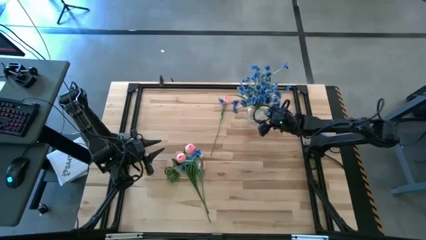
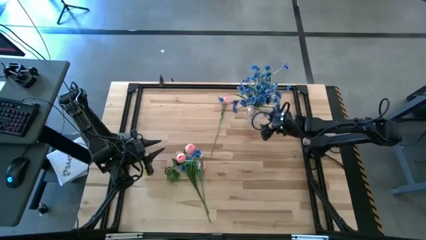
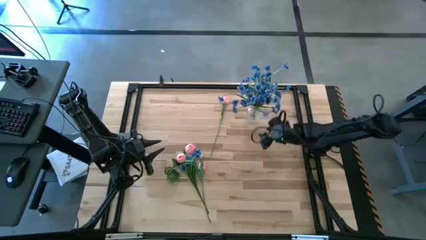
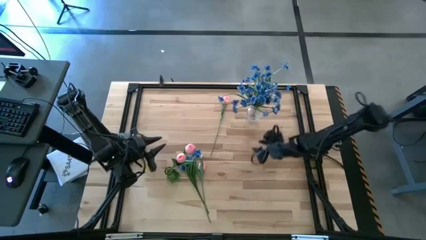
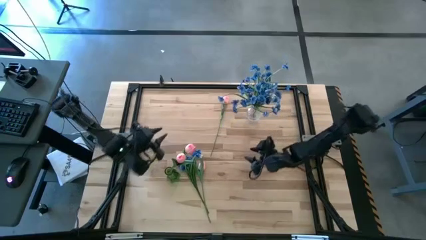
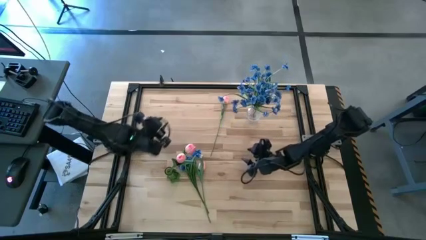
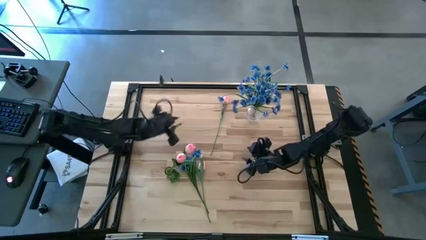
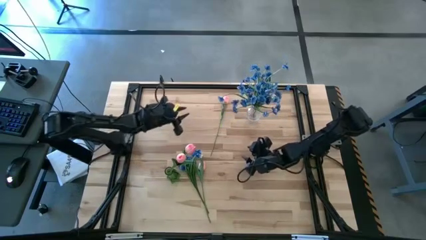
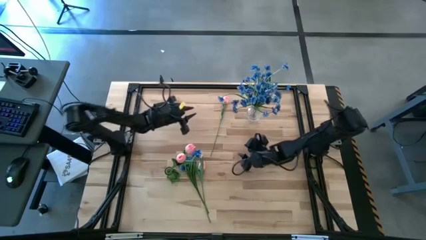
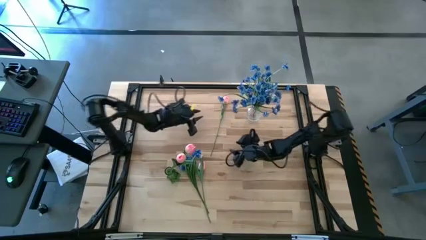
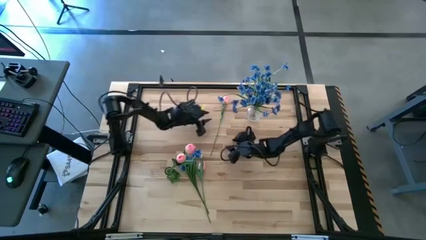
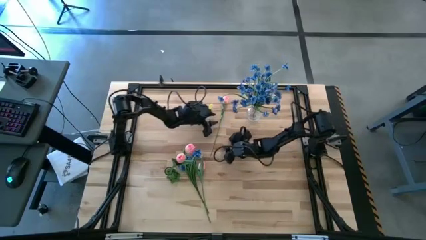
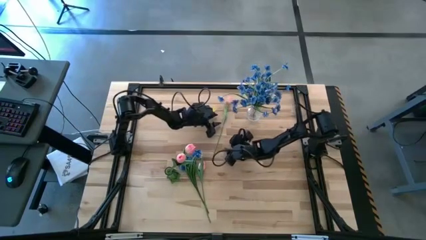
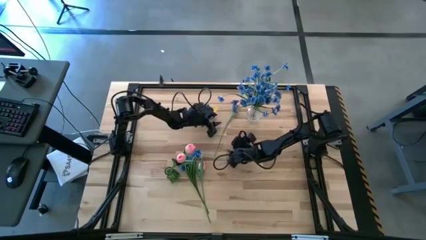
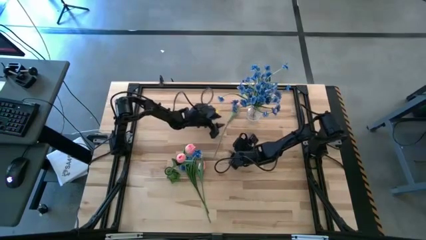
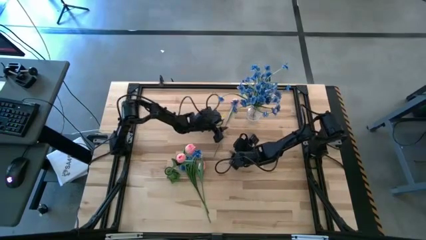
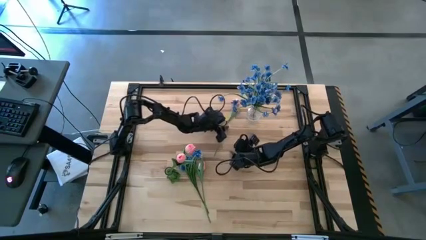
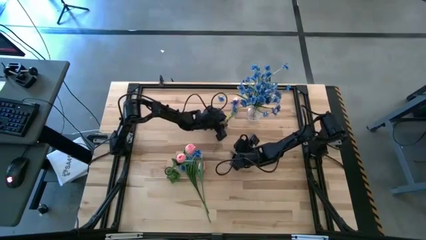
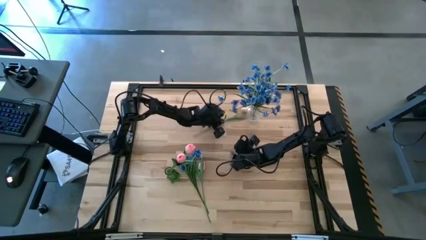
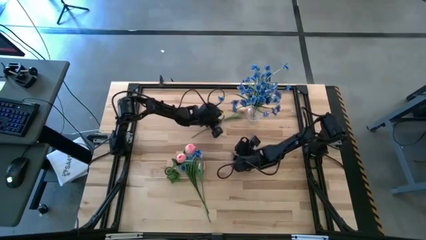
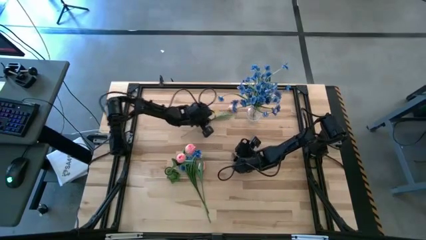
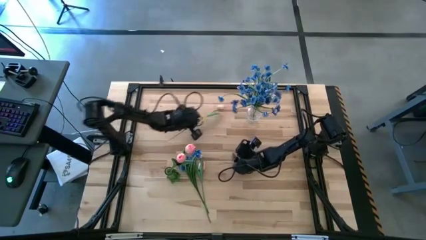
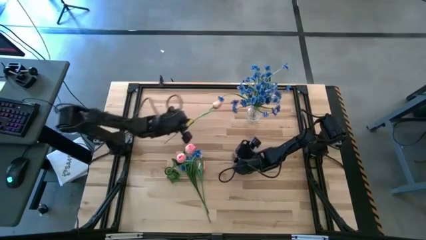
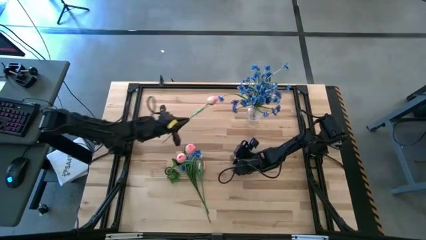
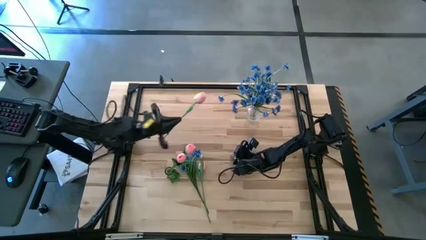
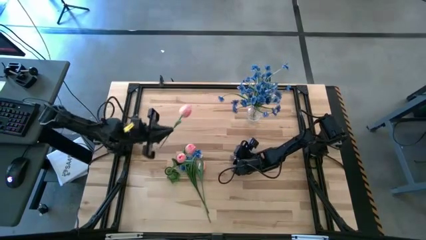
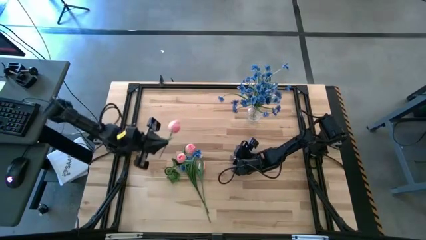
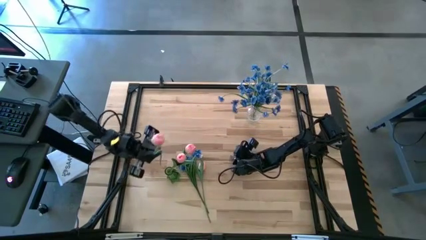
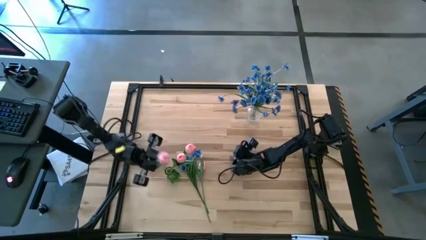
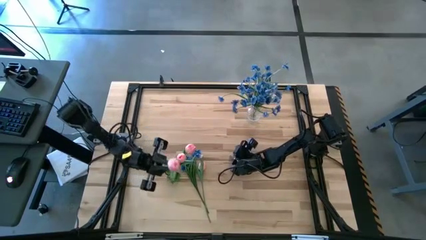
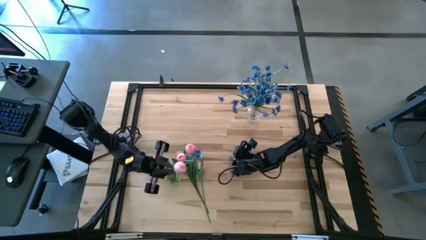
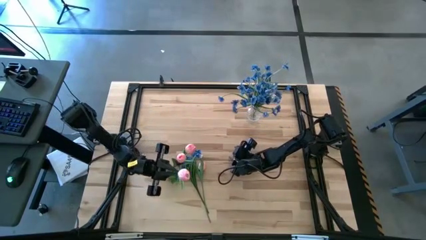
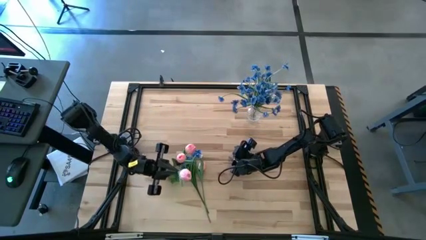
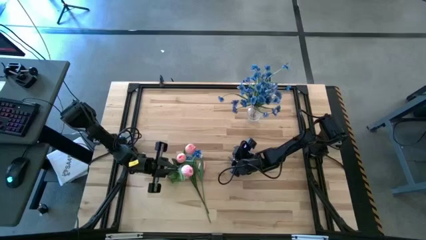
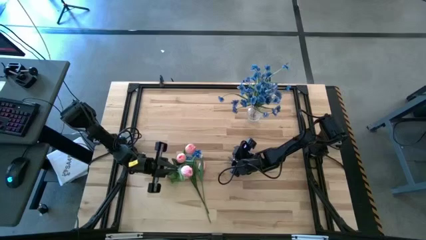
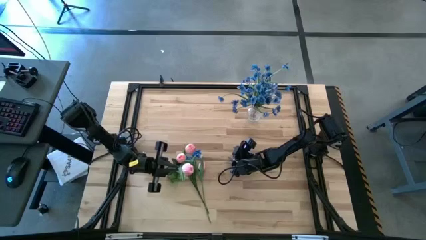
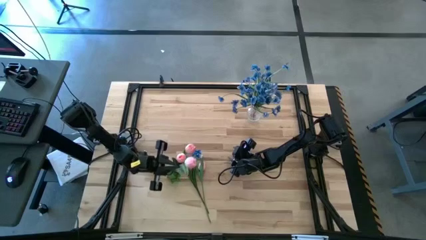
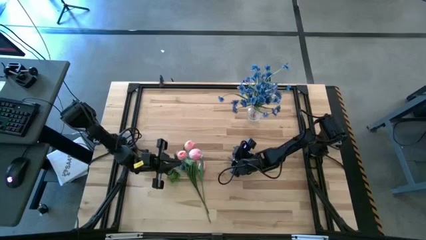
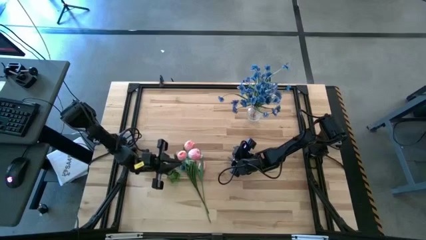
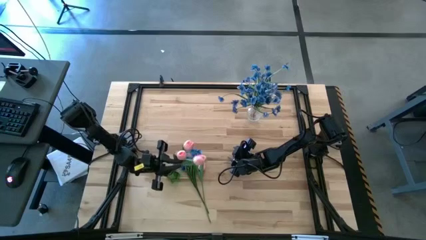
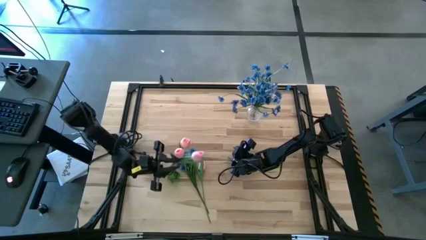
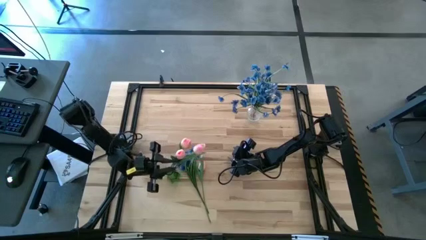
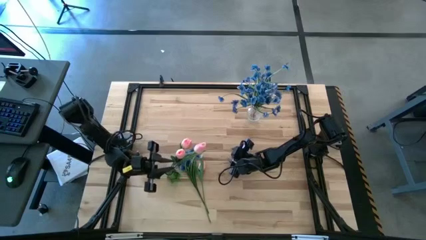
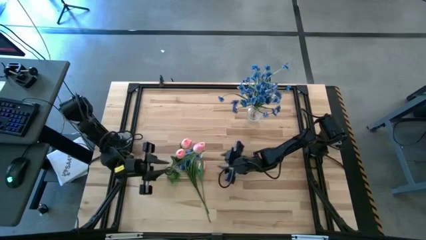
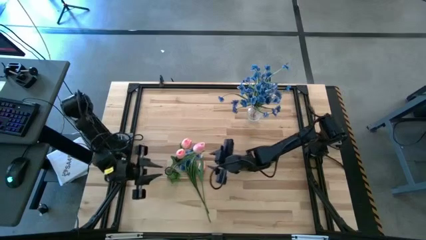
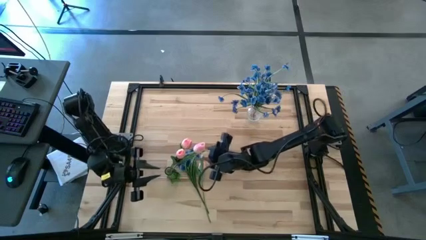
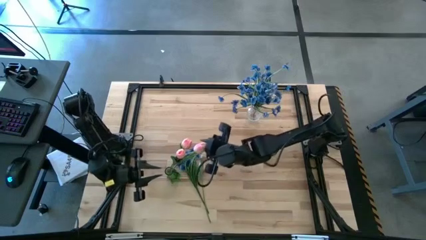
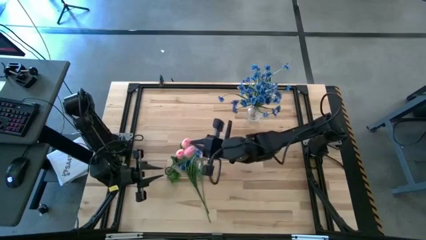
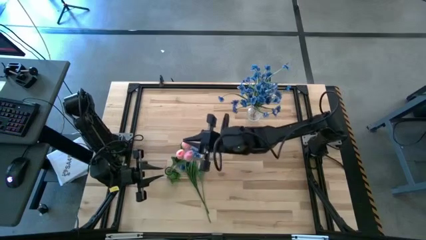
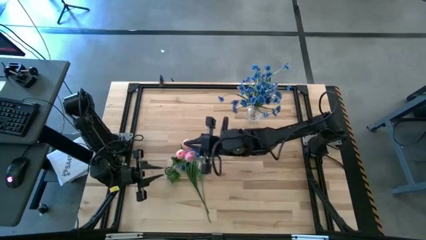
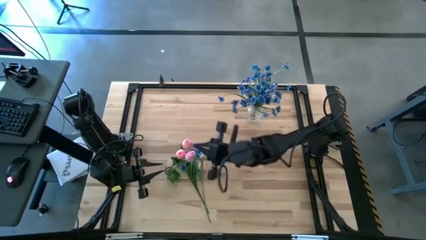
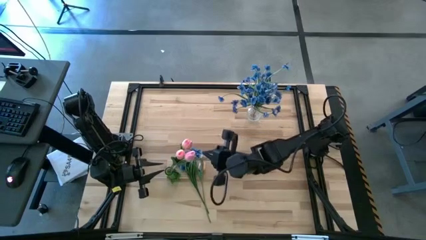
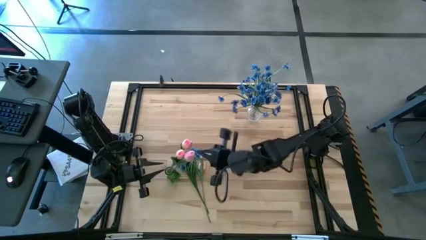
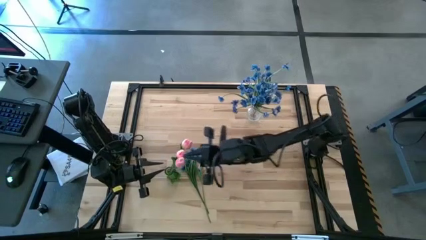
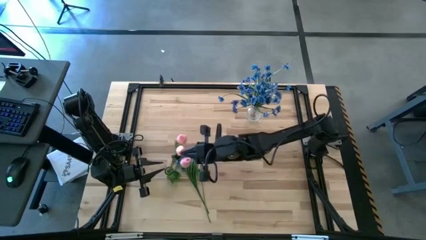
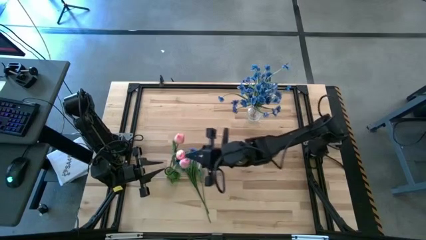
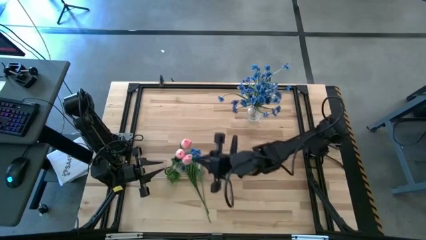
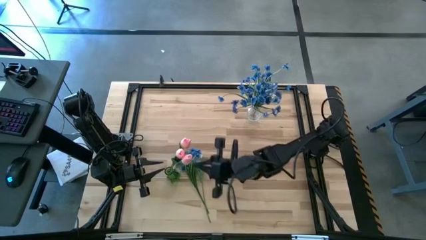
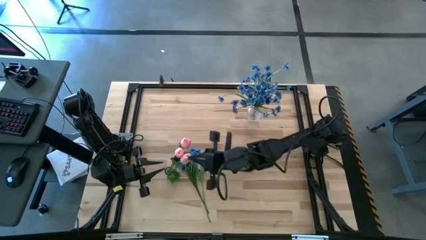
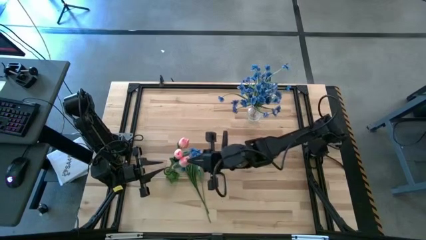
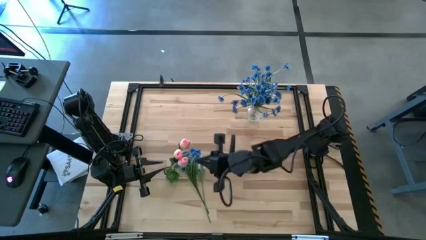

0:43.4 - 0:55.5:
Task: Sort flowers into vase by color
Put the top pink flower into the green vase
